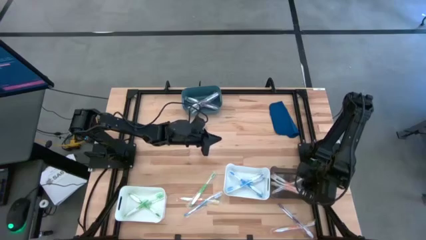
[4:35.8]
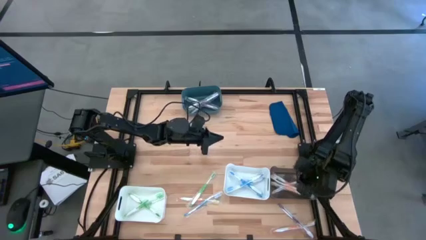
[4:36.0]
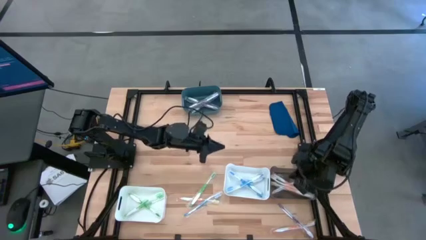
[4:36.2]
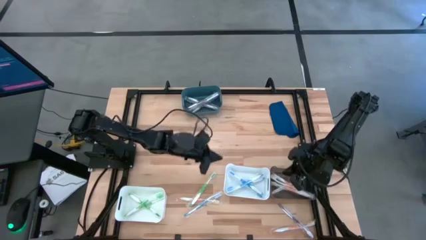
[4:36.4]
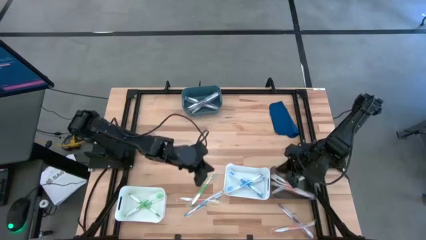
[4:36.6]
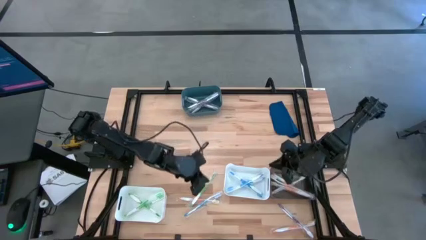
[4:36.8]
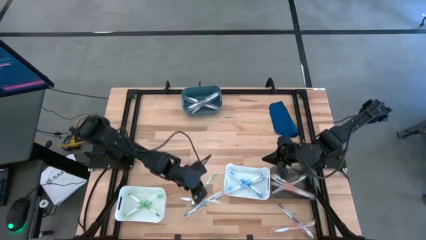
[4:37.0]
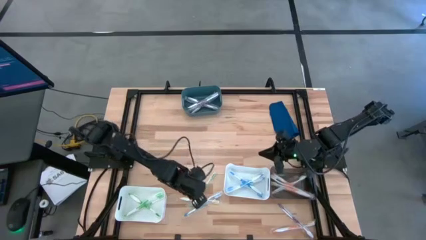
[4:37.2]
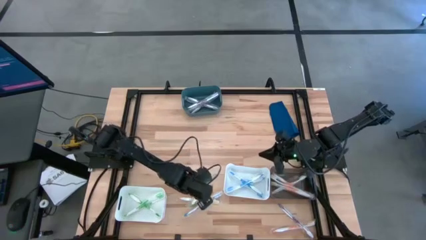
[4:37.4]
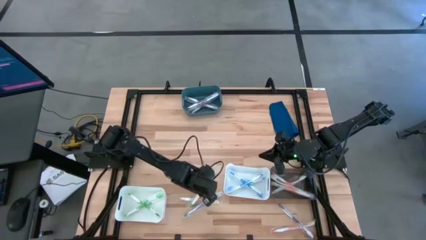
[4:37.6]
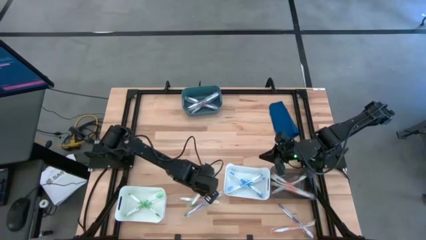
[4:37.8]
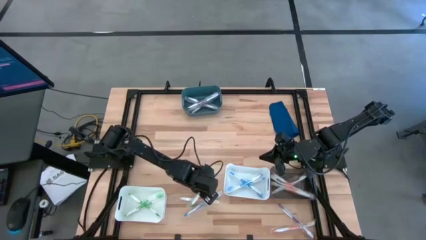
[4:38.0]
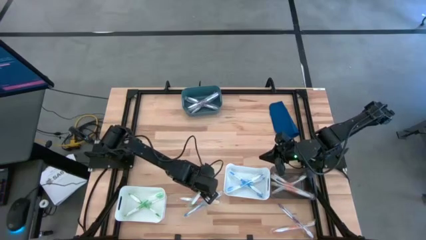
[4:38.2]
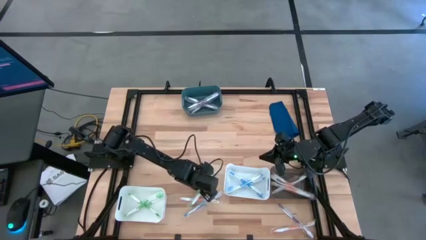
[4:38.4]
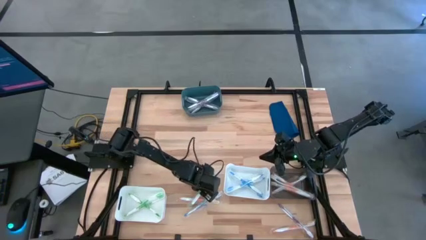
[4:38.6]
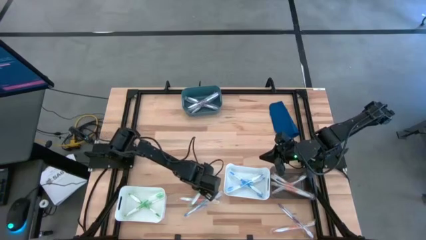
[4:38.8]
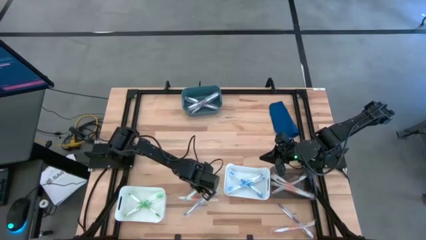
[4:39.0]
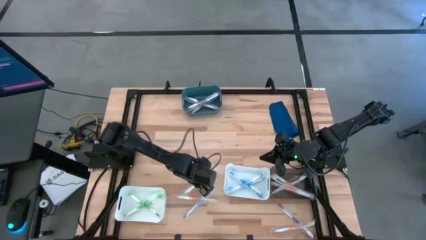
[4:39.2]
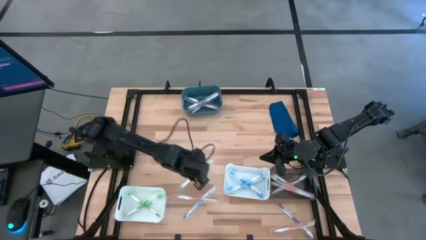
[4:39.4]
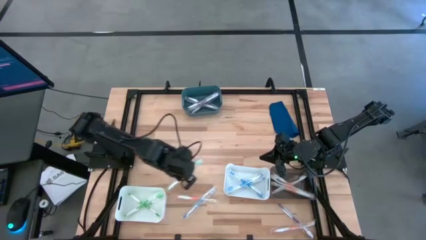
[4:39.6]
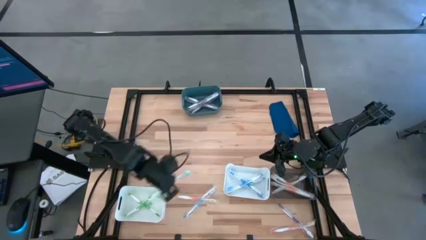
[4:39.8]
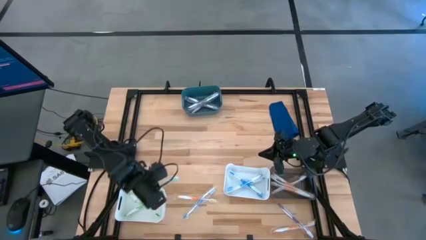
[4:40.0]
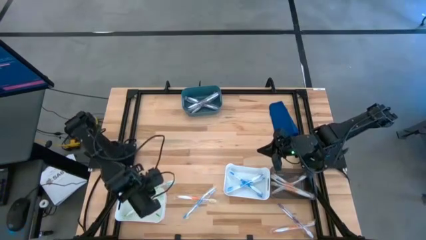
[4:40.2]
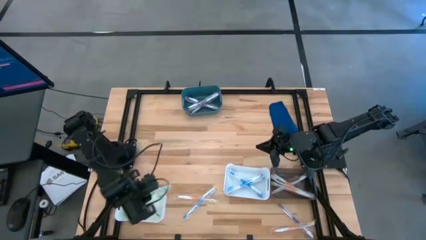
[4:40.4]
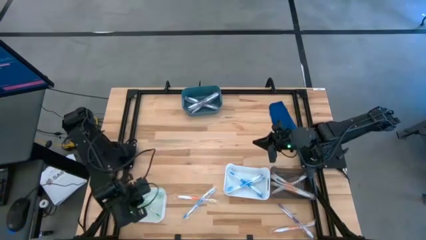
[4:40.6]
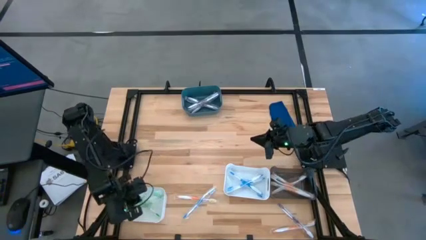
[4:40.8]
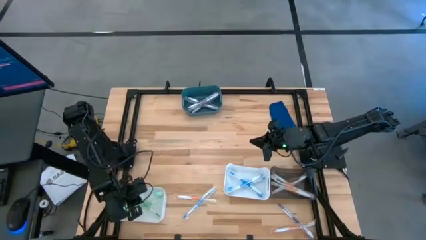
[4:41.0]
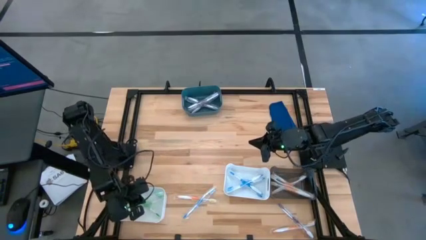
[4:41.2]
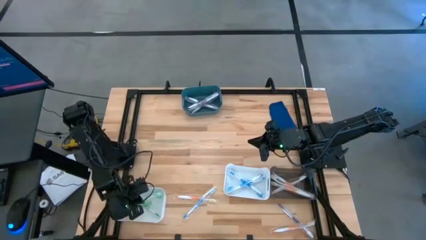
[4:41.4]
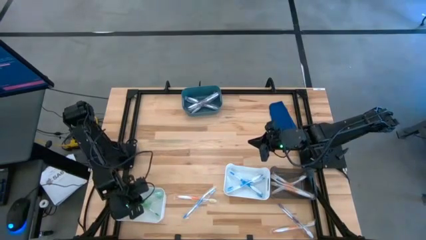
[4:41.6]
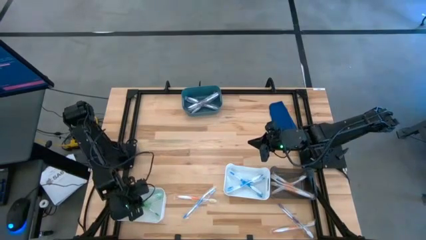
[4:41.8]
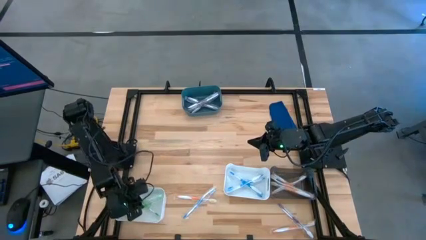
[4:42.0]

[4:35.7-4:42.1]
Task: Pick & Place Toothbrushes
Put the green toothbrush into the bottom white bin

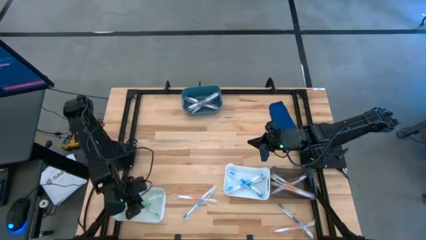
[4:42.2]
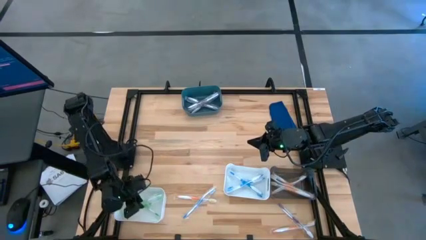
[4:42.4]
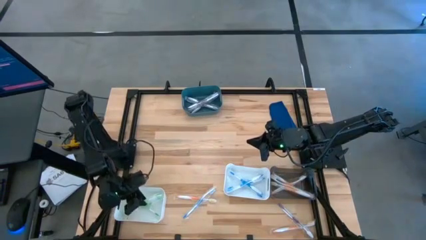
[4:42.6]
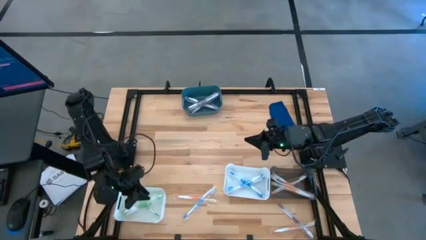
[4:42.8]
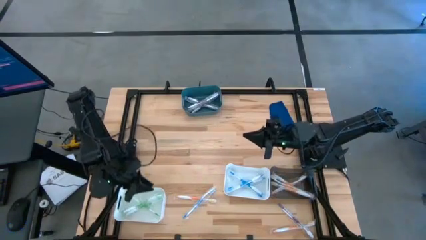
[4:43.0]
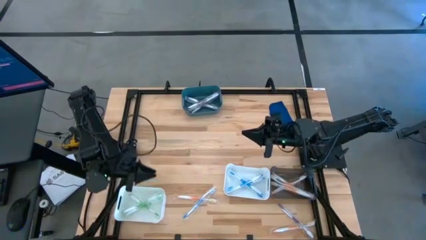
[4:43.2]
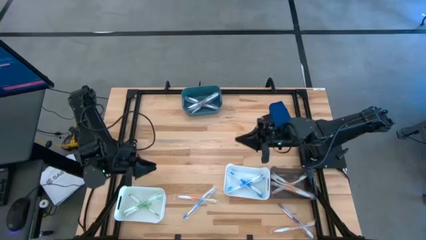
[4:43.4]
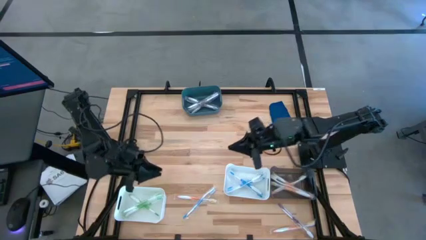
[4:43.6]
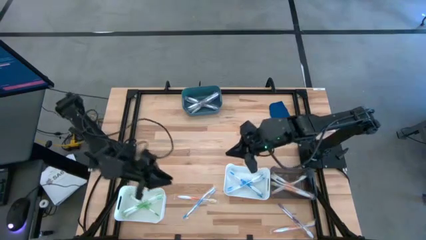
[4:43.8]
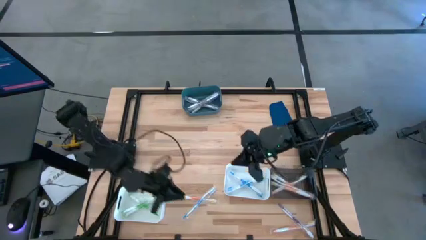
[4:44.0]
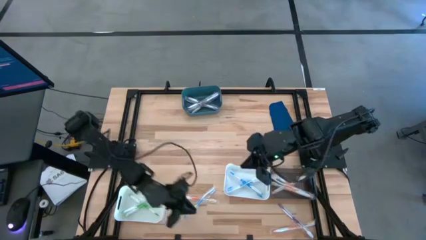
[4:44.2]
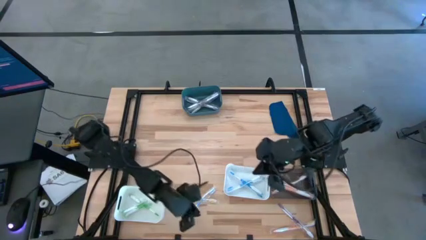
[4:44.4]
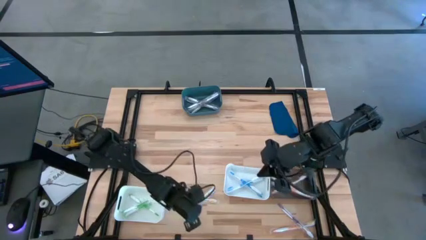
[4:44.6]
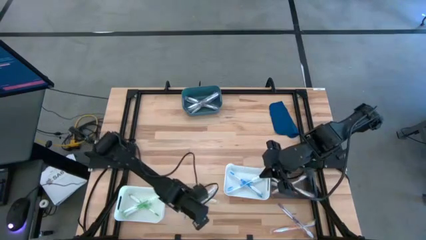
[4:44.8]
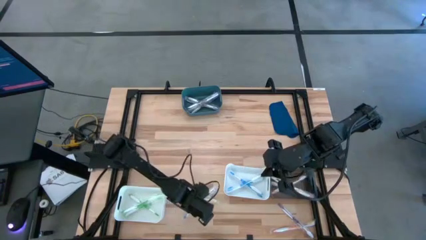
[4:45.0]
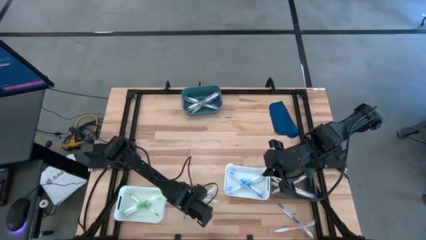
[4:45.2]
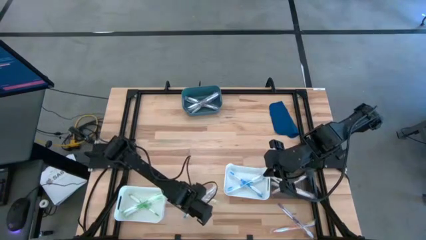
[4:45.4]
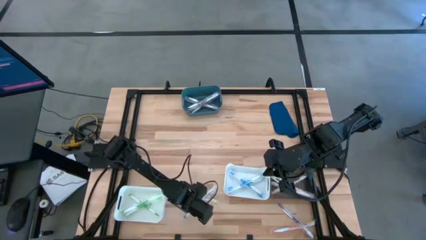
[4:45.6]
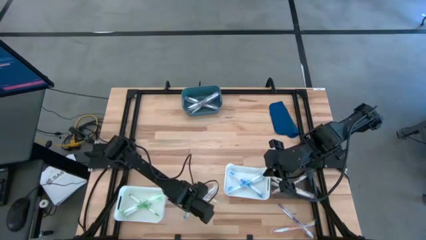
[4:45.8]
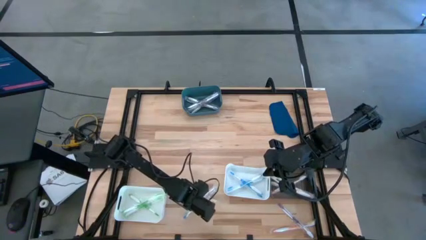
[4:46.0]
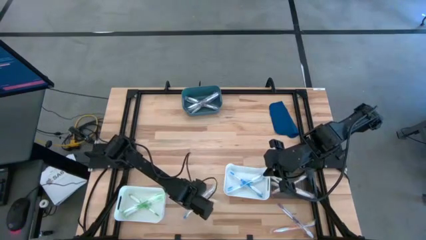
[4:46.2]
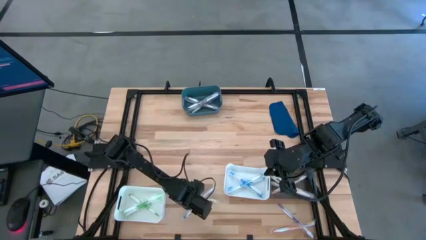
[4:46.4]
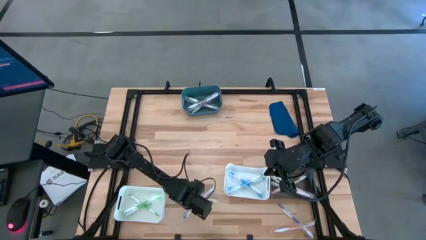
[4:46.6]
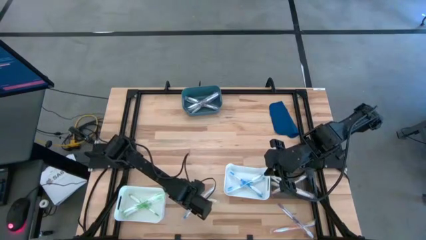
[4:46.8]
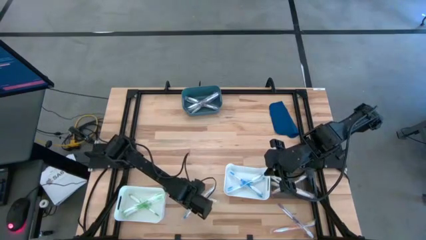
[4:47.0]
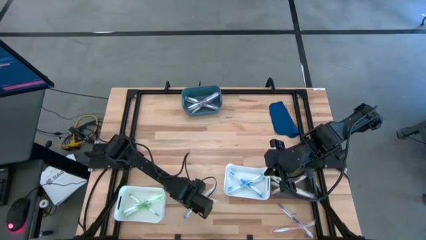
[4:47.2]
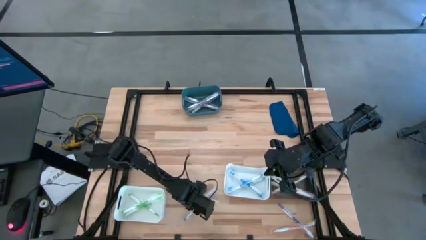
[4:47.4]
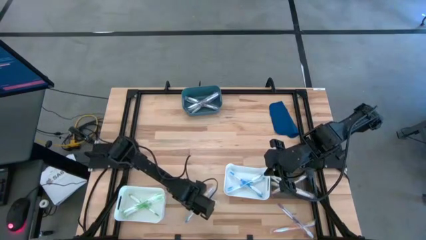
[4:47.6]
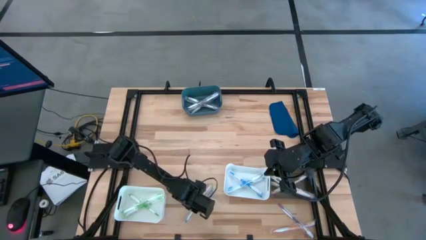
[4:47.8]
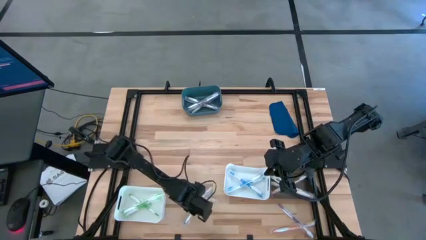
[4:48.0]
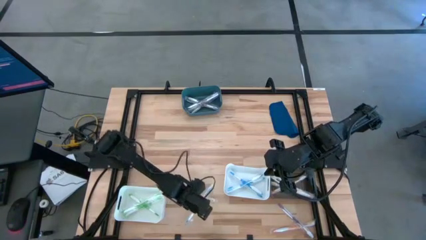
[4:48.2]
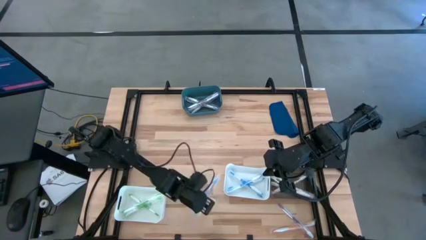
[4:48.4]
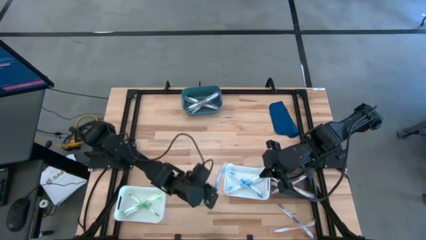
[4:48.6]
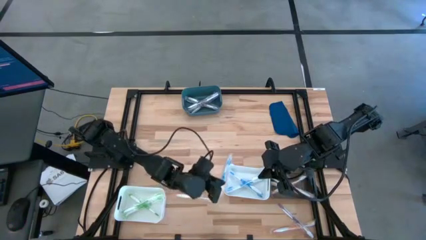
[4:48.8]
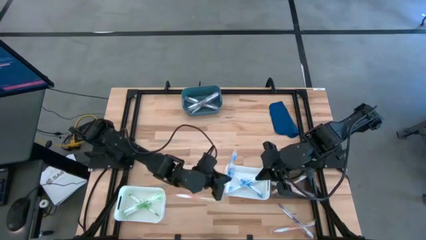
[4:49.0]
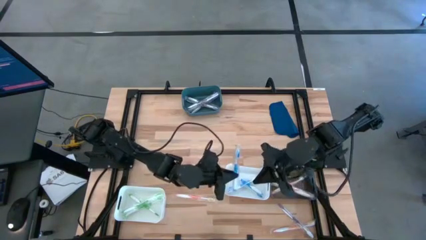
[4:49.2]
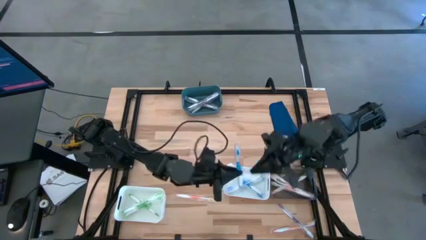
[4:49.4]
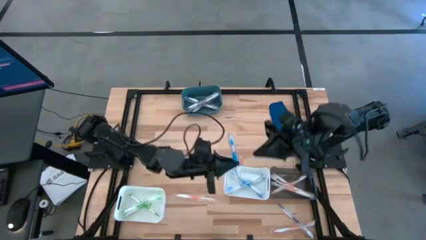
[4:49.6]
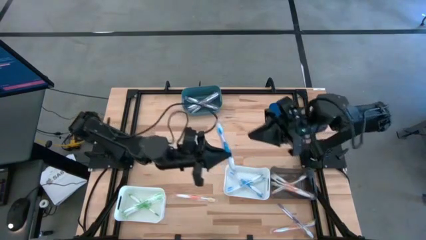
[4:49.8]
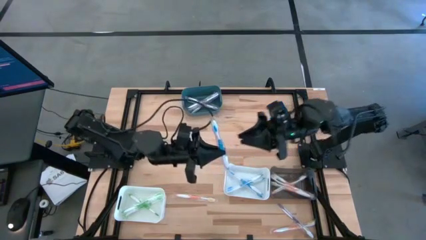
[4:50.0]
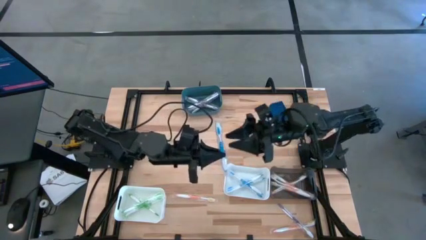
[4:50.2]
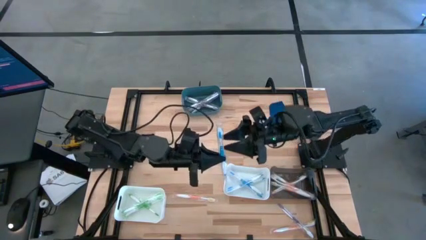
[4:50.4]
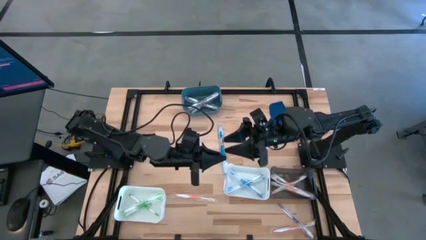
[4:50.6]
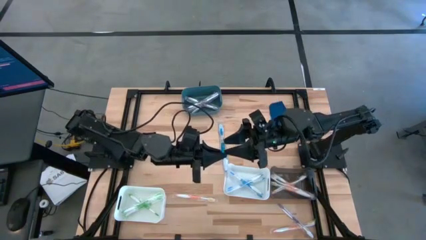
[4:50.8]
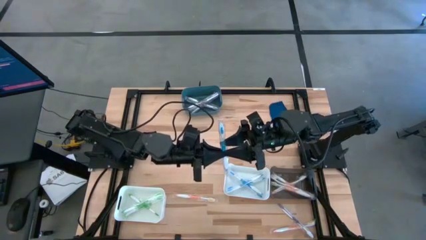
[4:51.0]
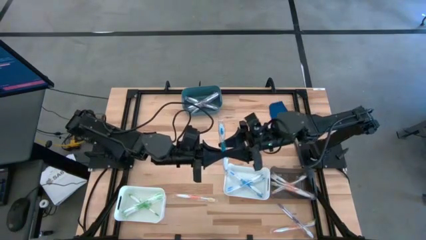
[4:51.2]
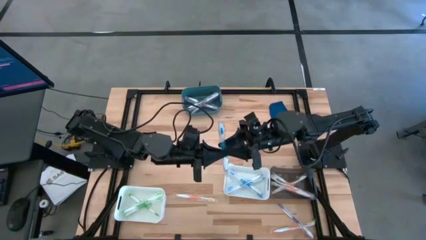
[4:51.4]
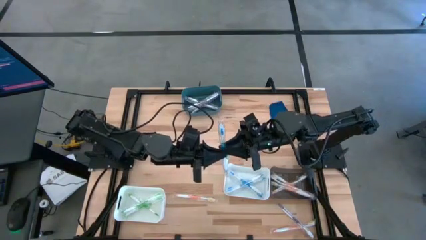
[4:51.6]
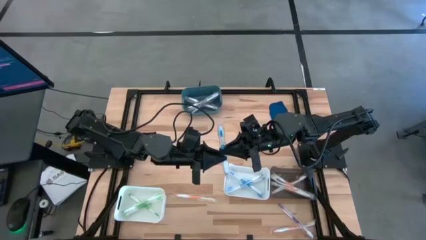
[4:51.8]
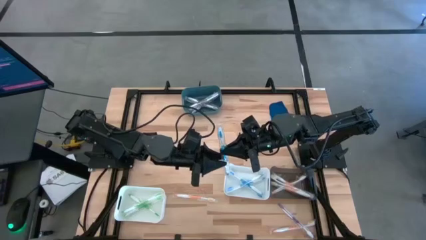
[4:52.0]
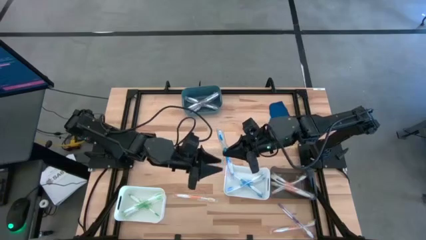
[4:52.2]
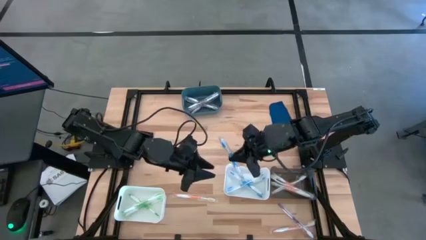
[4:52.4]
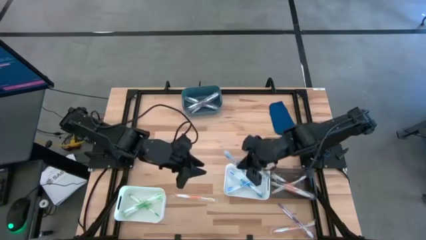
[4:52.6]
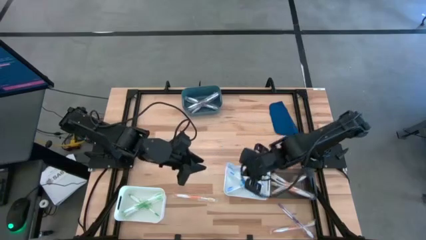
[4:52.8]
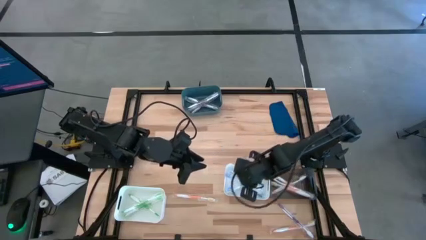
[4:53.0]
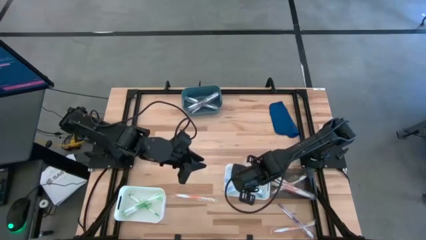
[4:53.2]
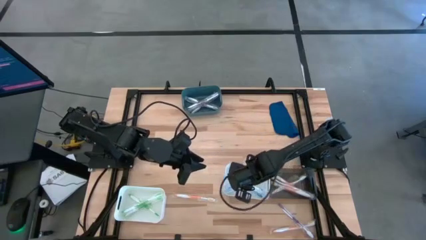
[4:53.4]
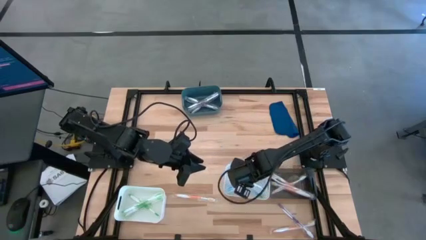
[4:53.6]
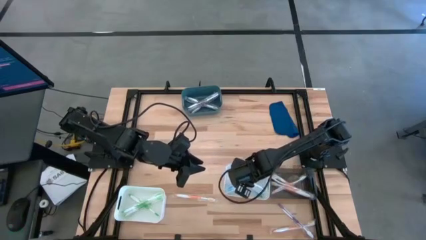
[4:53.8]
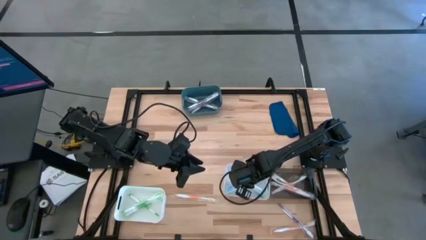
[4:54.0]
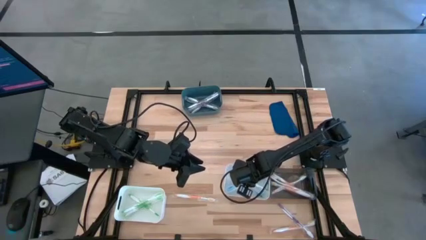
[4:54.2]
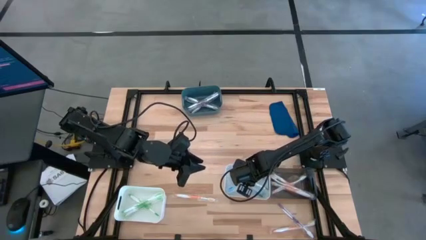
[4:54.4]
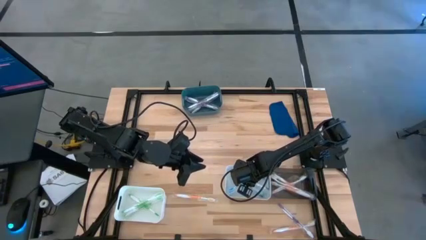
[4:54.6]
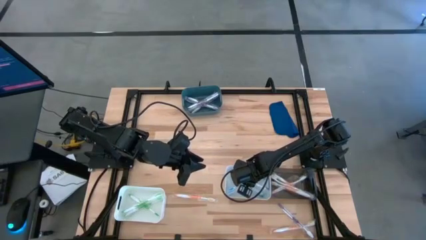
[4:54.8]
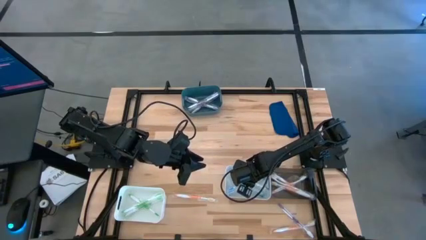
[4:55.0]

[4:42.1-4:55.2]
Put the blue toothbrush into the top white bin
